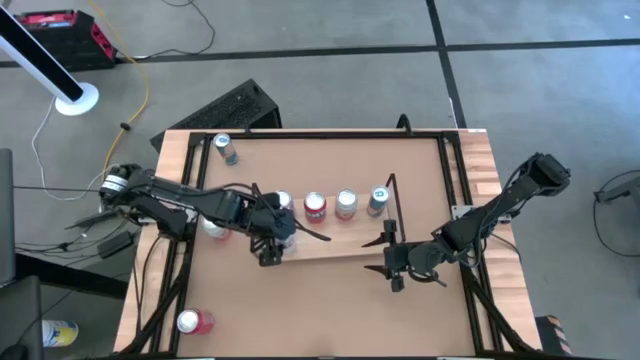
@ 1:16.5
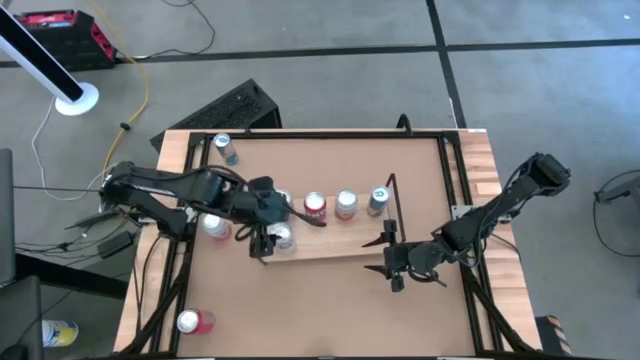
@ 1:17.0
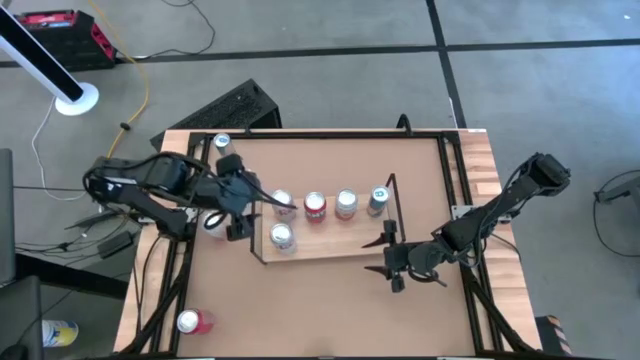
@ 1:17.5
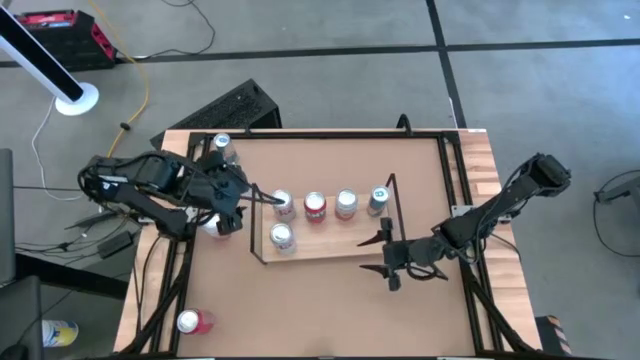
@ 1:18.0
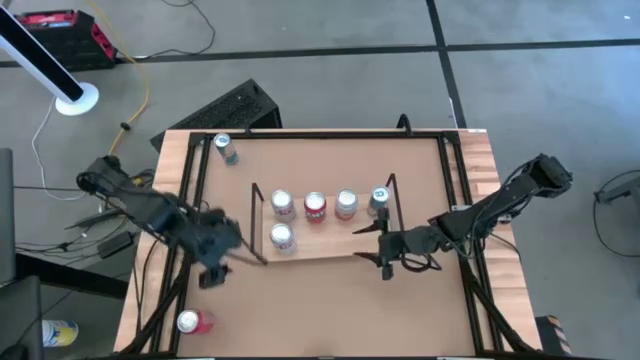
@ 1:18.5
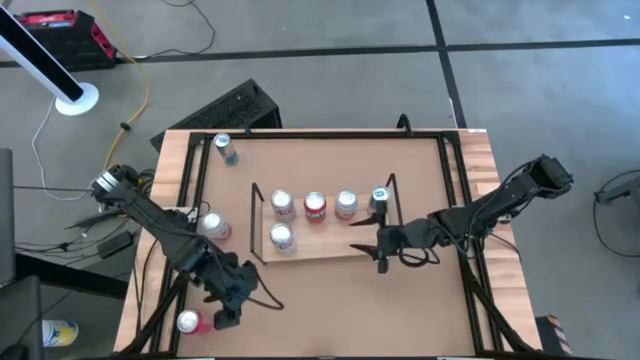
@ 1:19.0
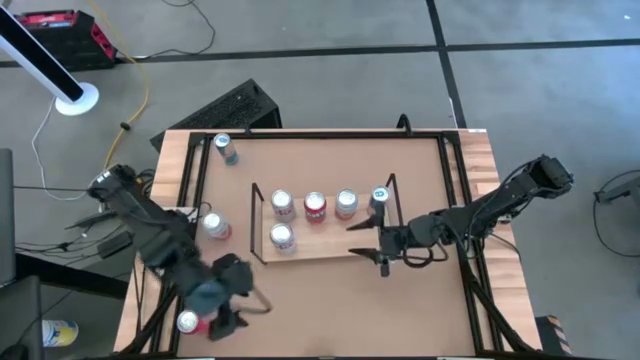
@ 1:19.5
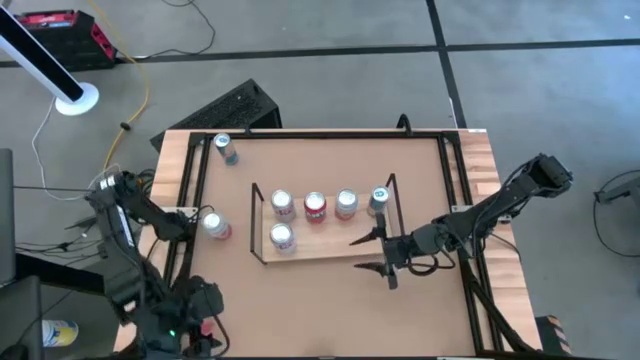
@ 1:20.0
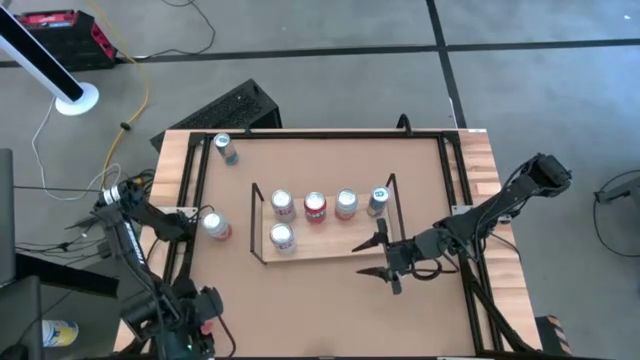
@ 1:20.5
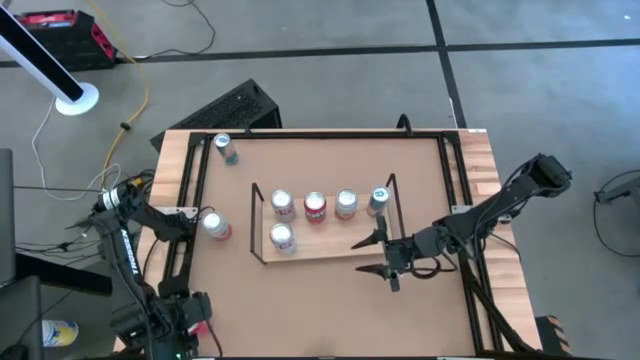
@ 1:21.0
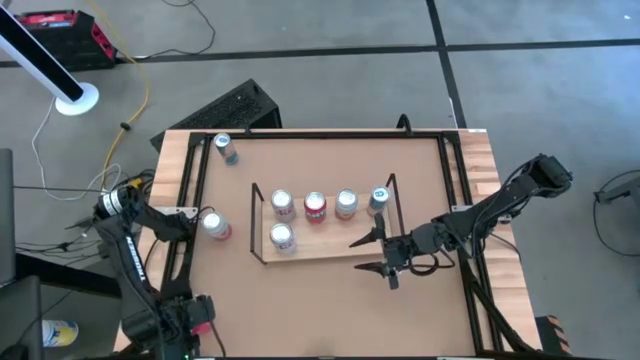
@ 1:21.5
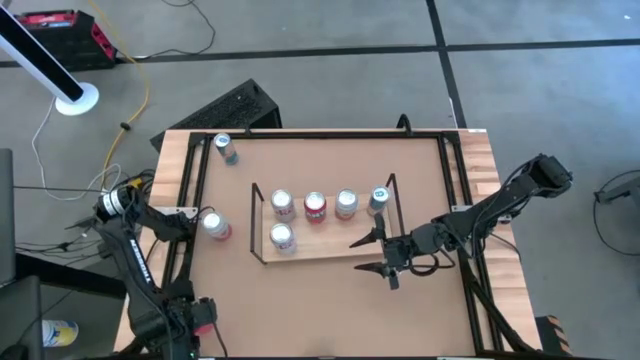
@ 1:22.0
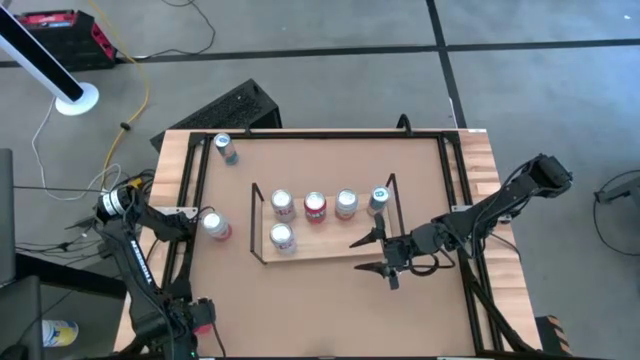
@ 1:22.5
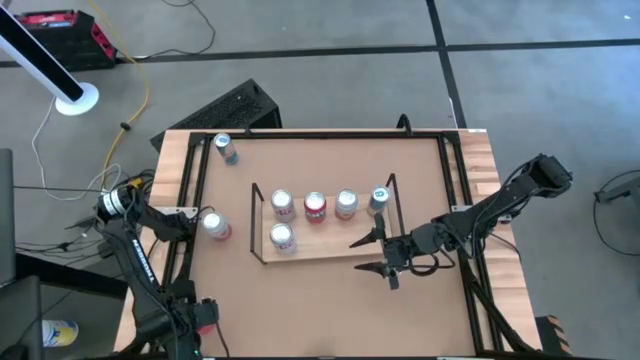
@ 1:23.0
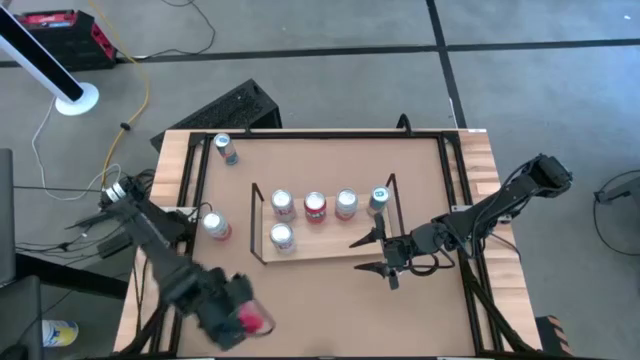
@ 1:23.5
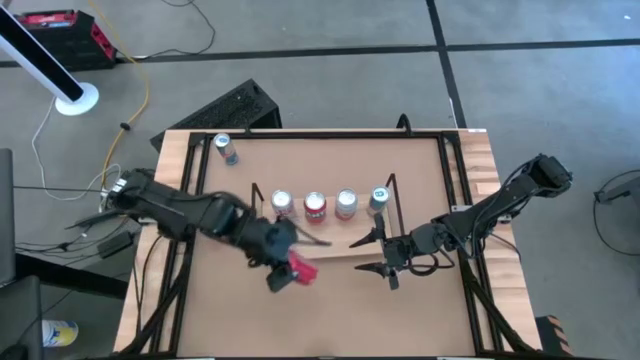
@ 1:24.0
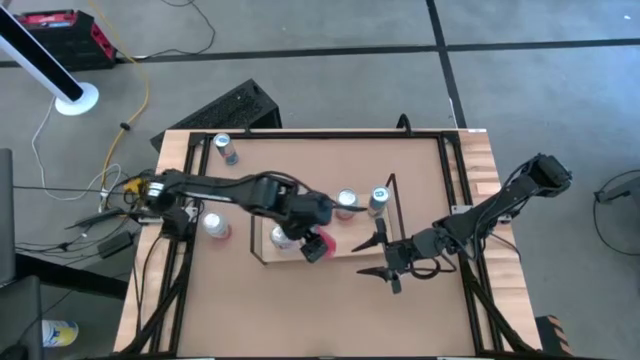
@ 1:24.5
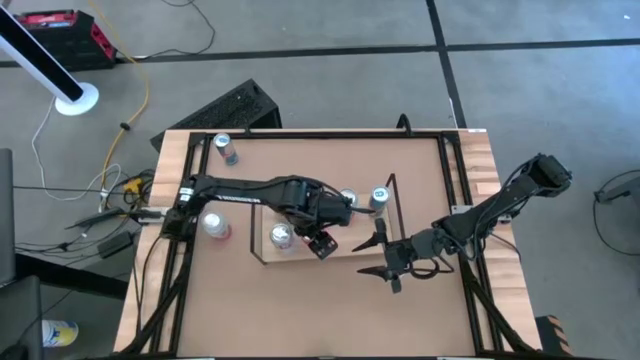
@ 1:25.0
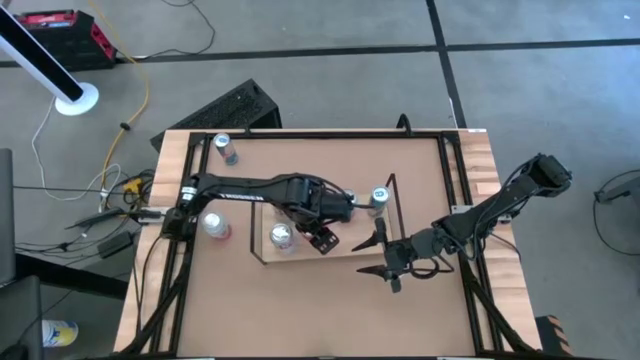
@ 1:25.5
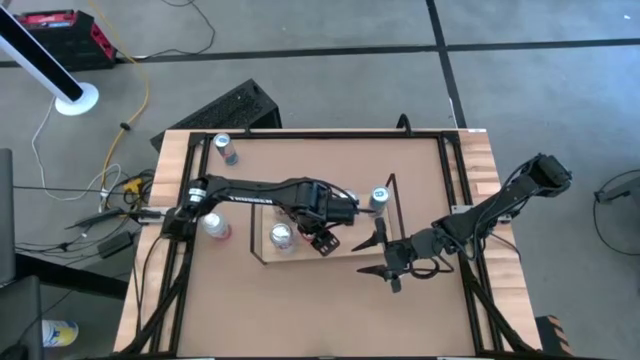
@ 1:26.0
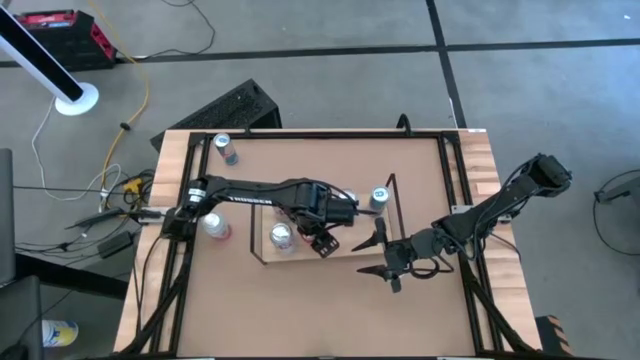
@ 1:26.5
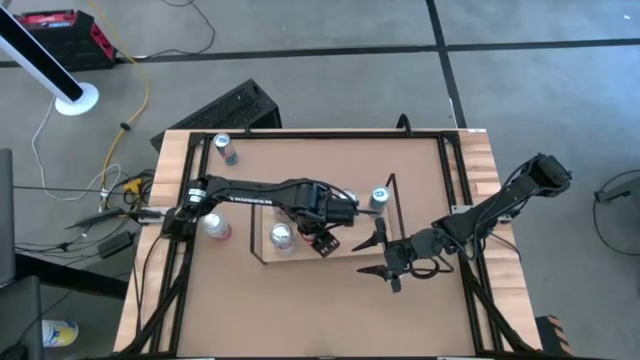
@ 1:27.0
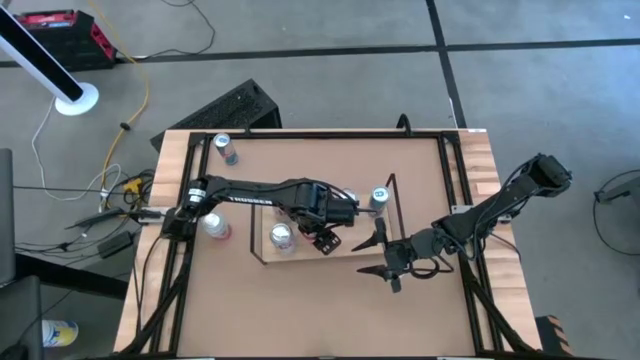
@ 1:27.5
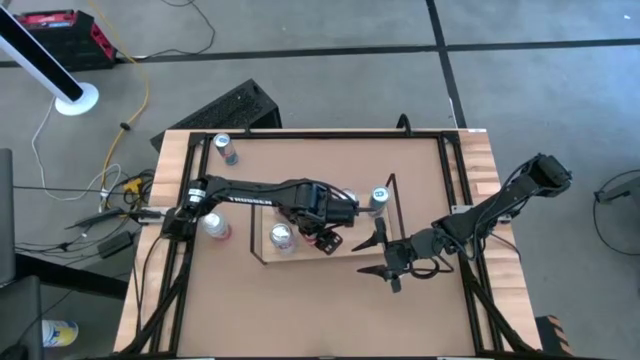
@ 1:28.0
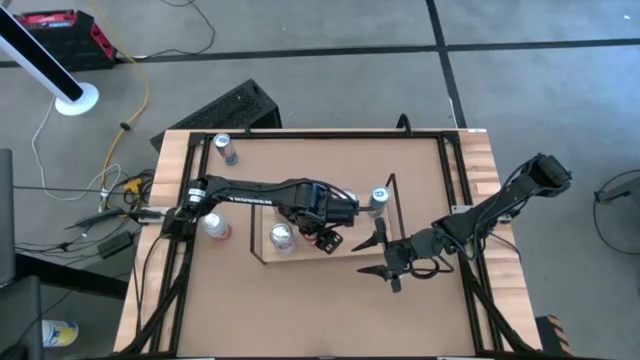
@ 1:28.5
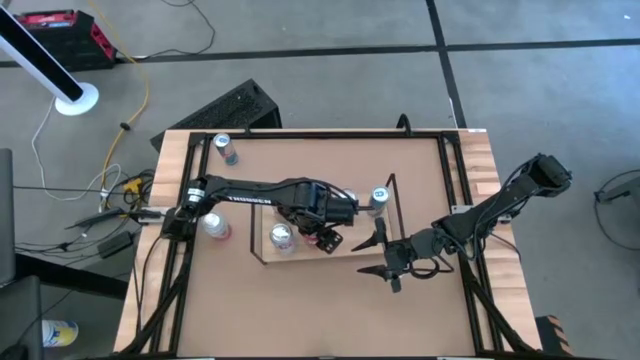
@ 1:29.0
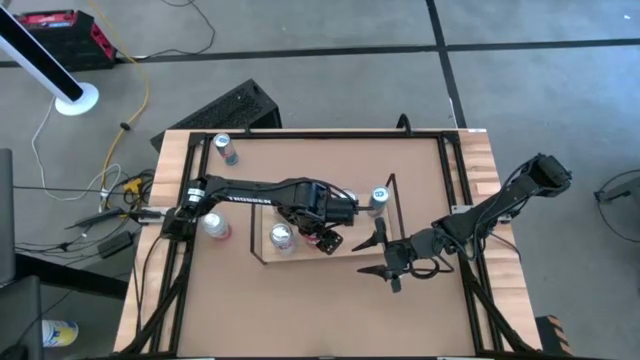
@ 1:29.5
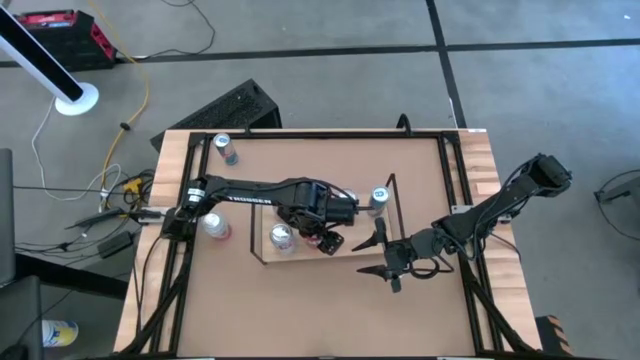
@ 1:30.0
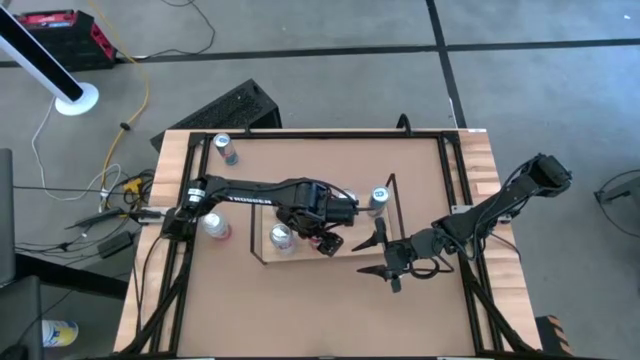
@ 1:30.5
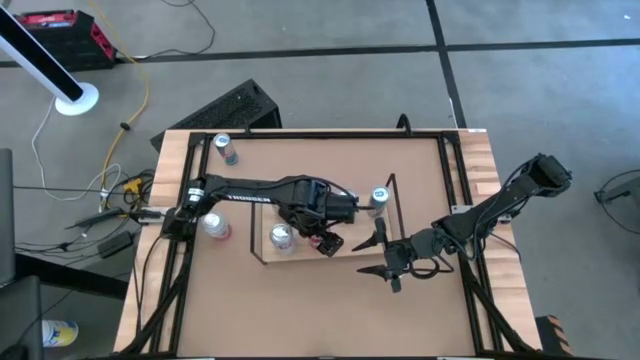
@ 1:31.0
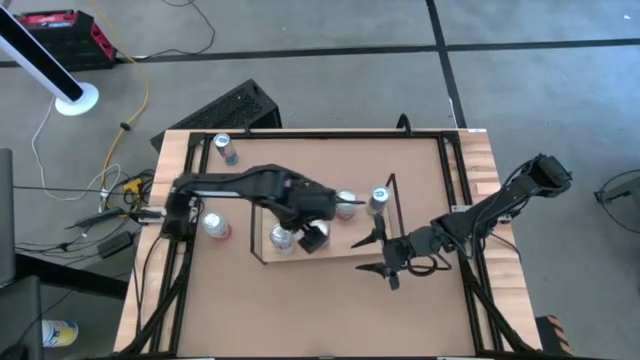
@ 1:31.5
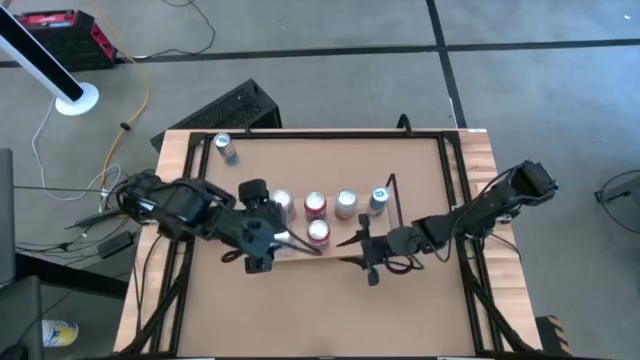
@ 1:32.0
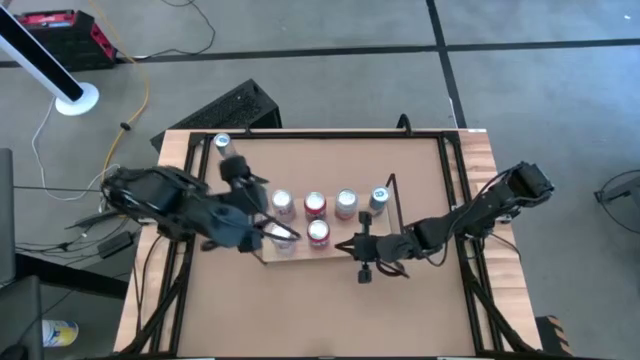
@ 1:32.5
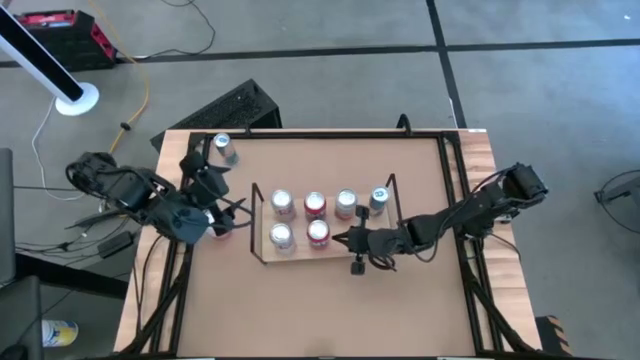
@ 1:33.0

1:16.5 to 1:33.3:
Task: Place canned beverage on shelf
Put the orange soda can on the shelf aligned with the other pink soda can

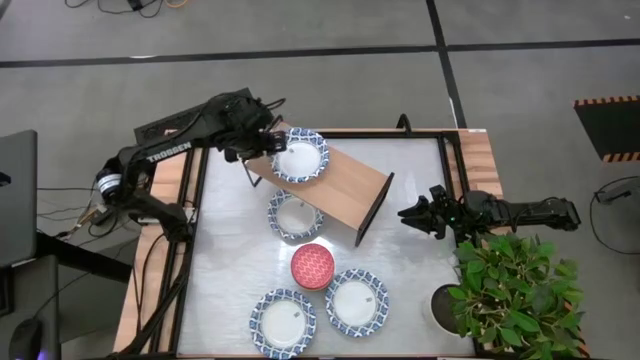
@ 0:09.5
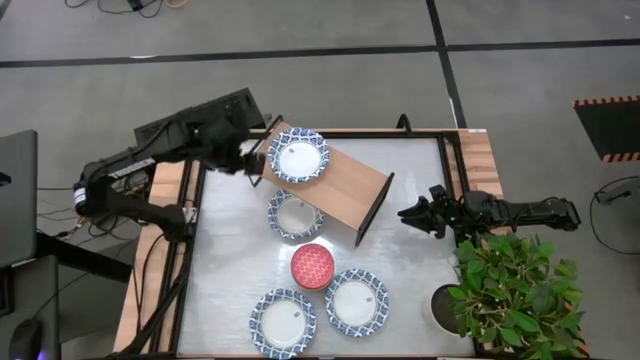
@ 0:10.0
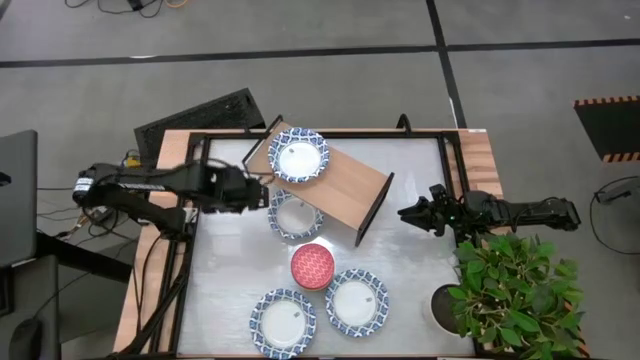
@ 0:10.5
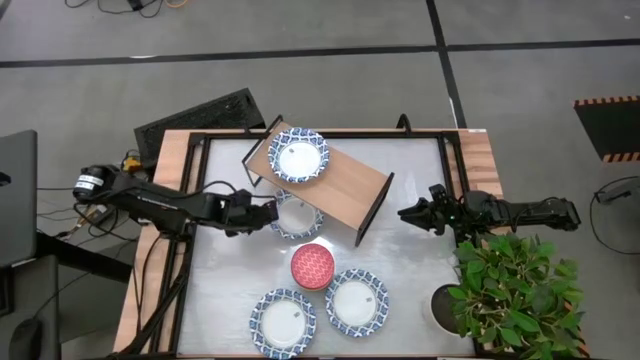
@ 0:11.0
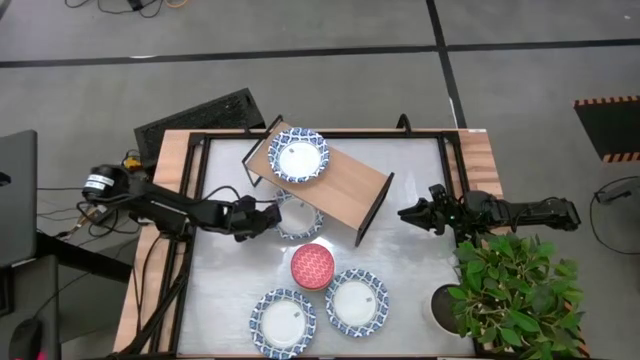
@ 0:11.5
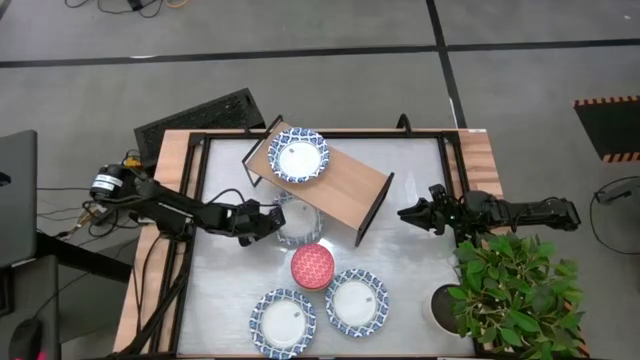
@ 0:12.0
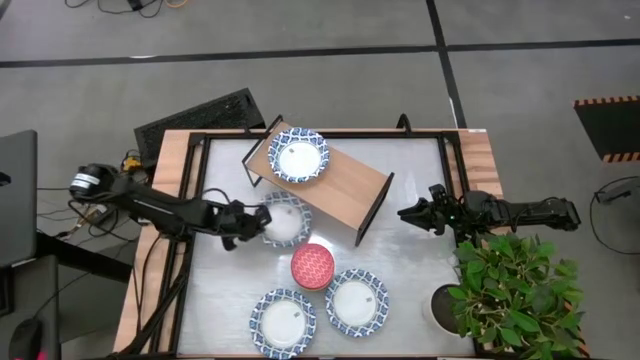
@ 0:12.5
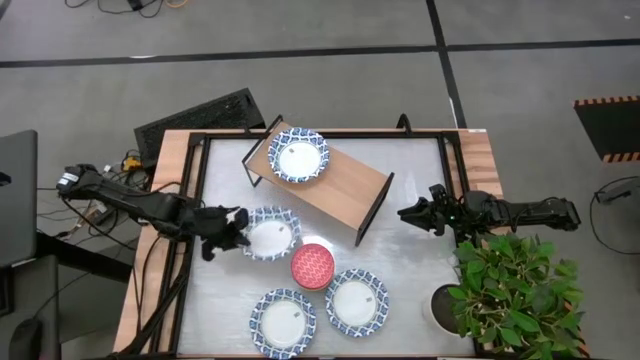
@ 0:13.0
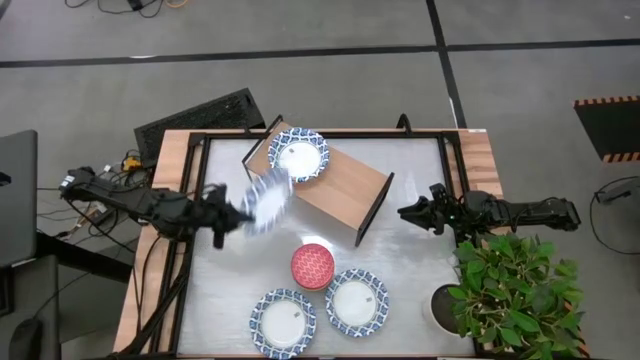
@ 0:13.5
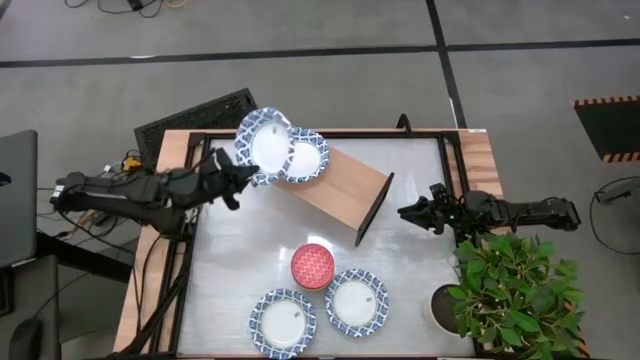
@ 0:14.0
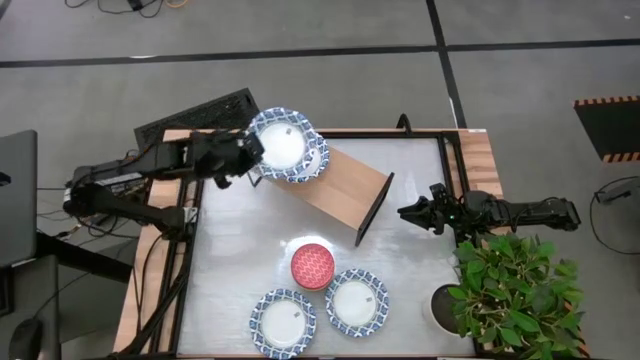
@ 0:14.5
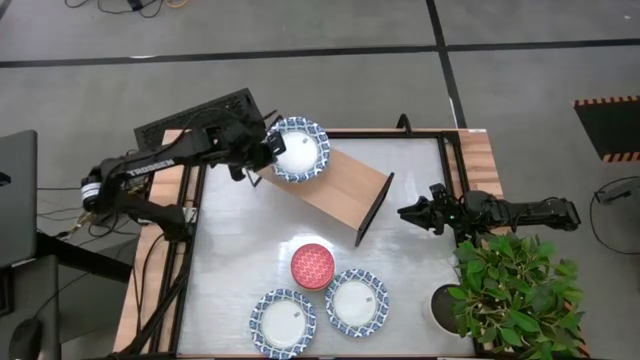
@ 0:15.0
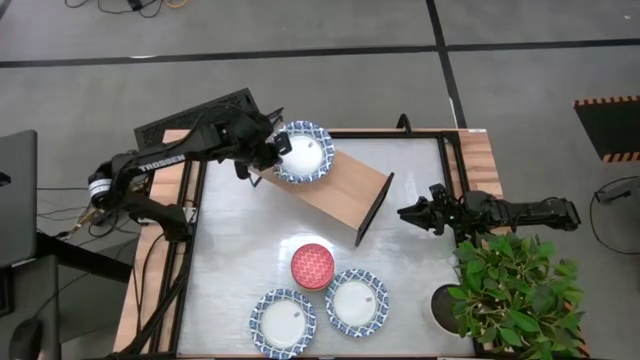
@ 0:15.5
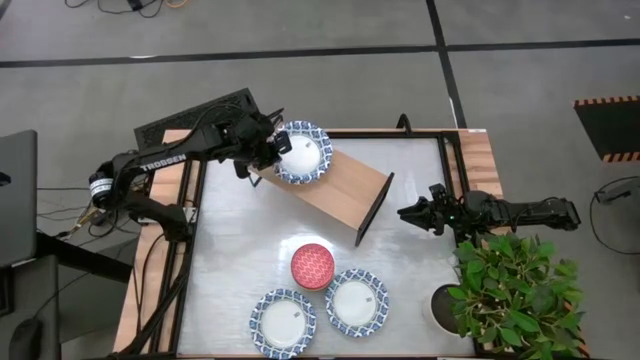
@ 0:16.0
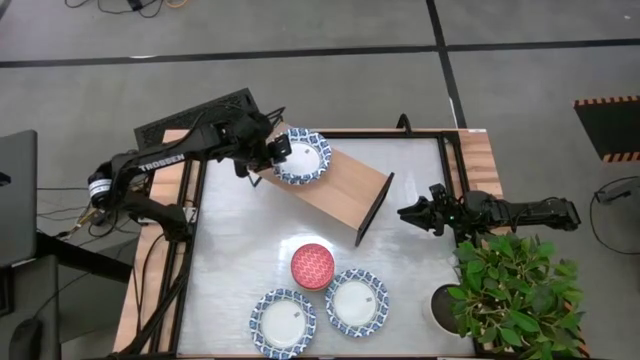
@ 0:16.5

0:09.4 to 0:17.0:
Task: Place and stack bowls onto a shelf
Stack the top white bowl on top of the white bowl on the shelf
